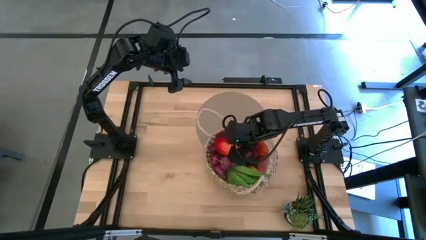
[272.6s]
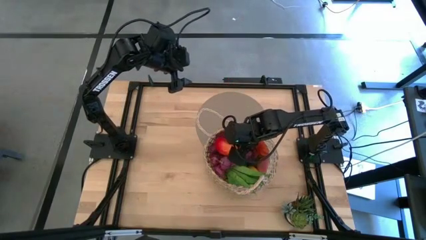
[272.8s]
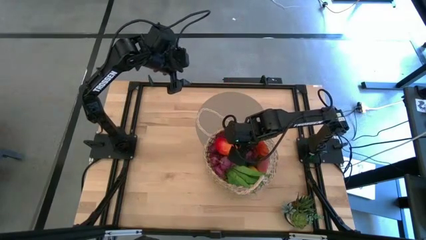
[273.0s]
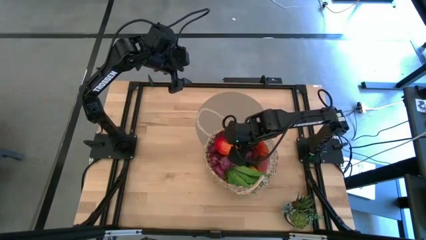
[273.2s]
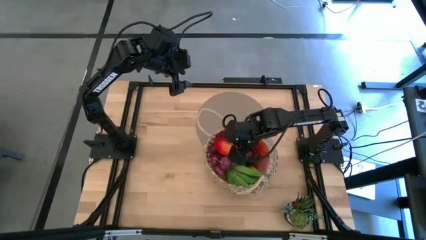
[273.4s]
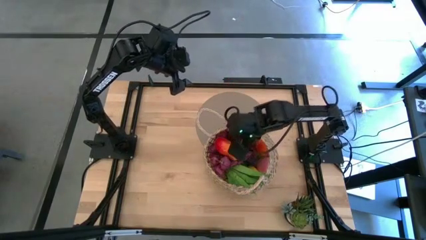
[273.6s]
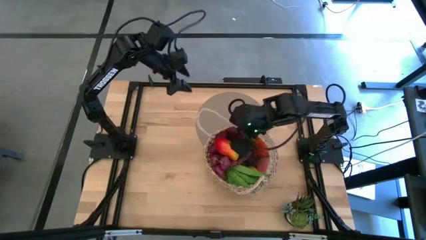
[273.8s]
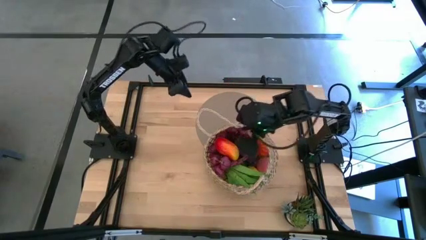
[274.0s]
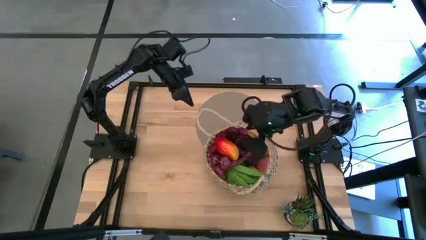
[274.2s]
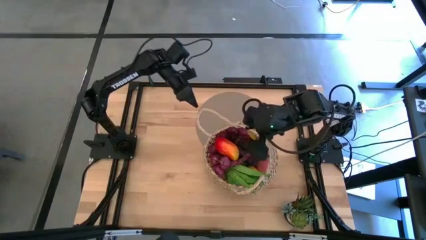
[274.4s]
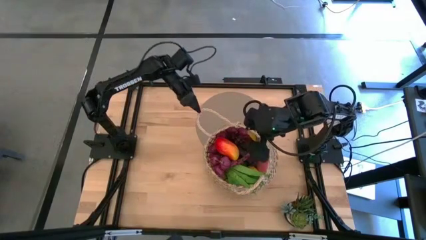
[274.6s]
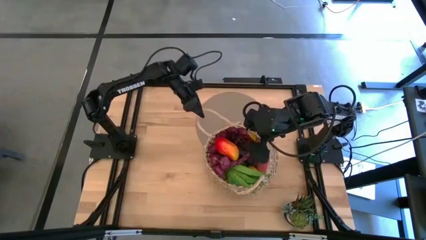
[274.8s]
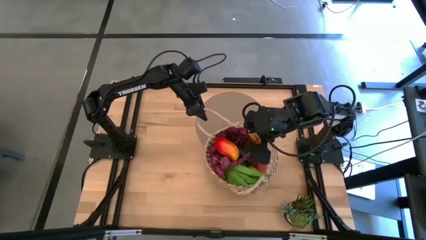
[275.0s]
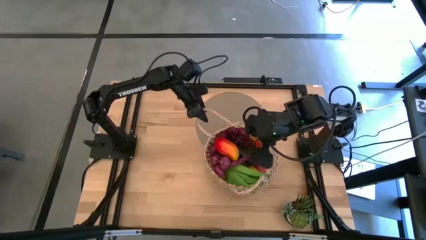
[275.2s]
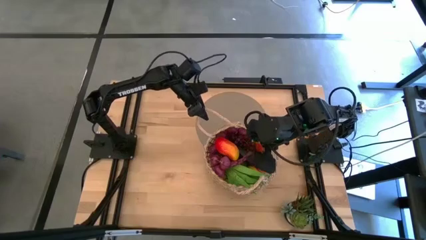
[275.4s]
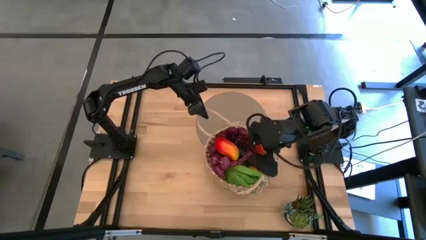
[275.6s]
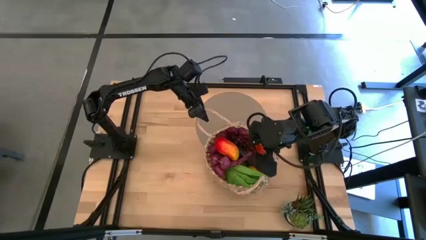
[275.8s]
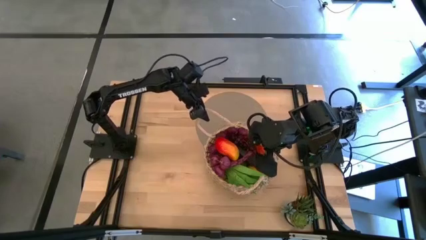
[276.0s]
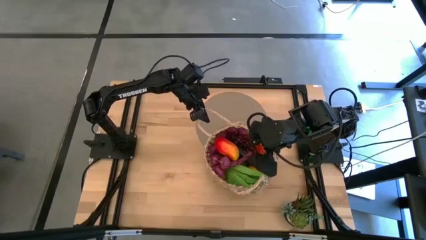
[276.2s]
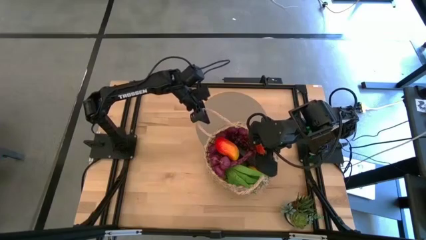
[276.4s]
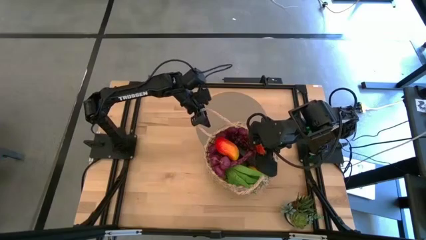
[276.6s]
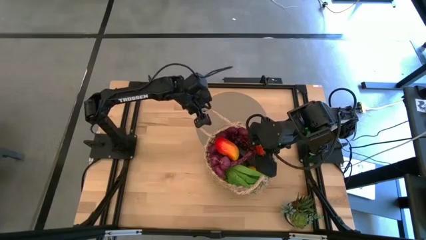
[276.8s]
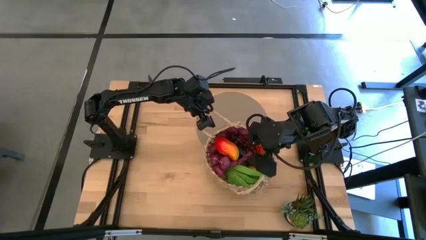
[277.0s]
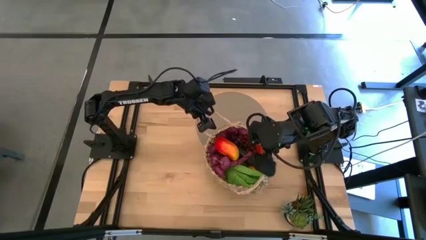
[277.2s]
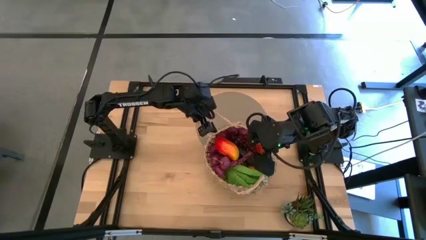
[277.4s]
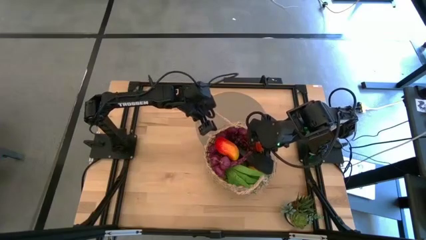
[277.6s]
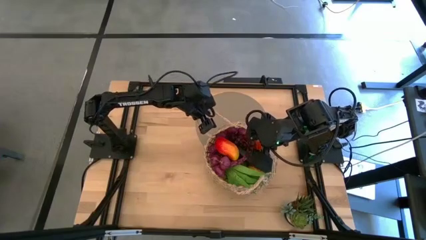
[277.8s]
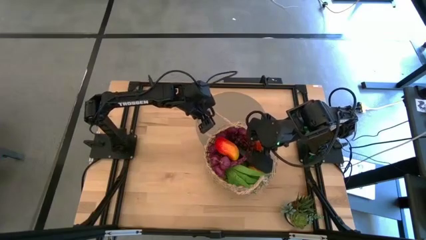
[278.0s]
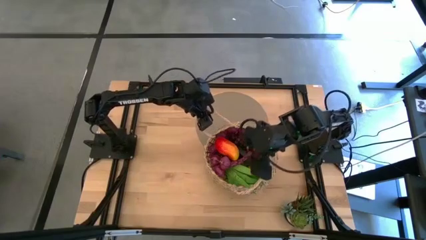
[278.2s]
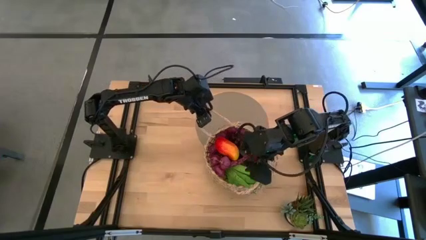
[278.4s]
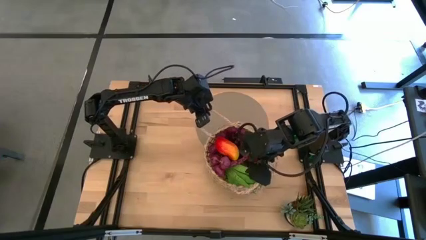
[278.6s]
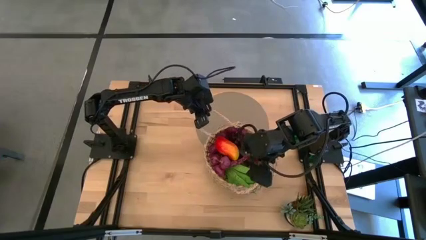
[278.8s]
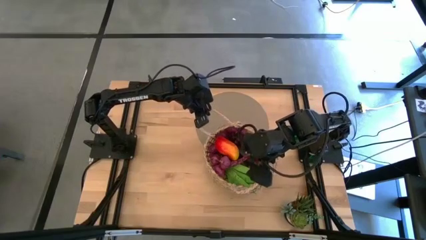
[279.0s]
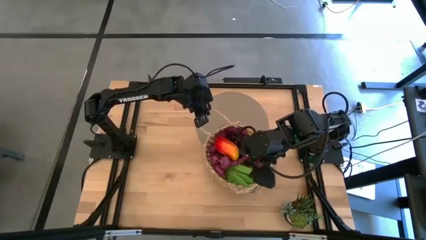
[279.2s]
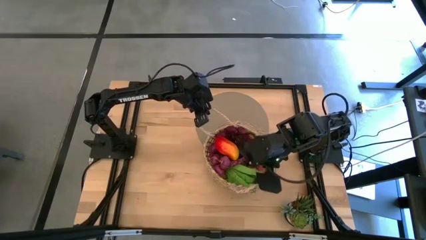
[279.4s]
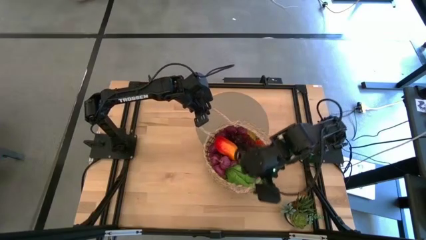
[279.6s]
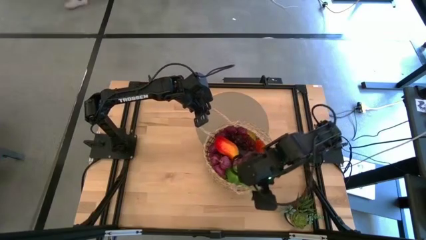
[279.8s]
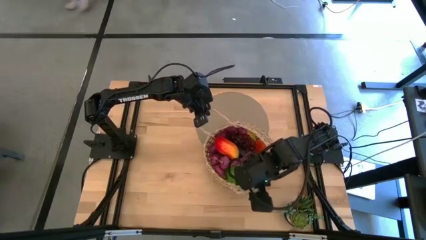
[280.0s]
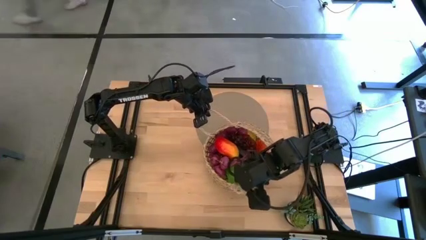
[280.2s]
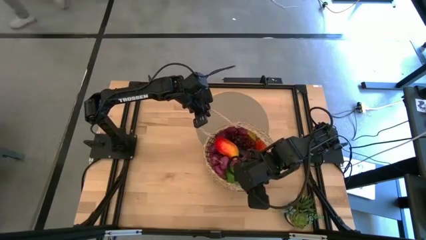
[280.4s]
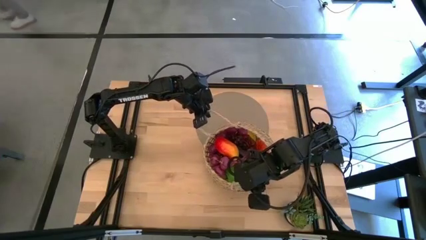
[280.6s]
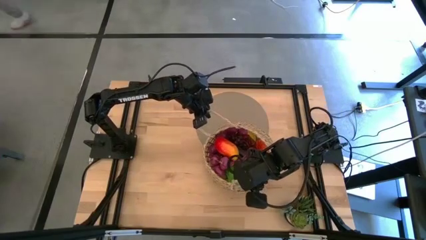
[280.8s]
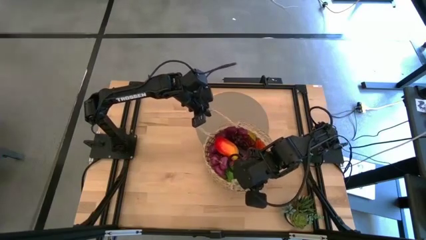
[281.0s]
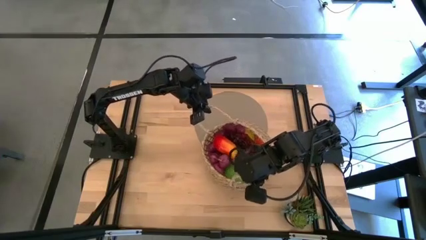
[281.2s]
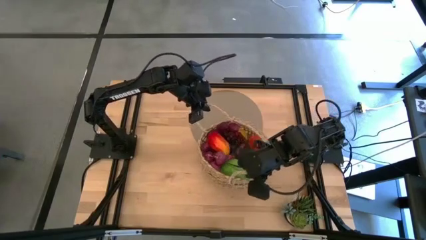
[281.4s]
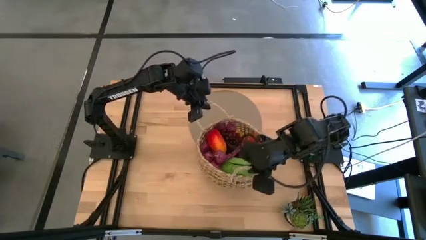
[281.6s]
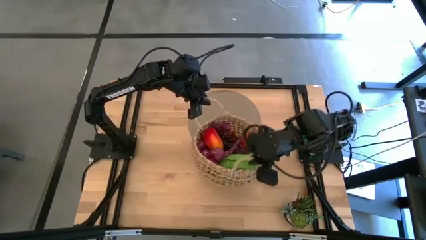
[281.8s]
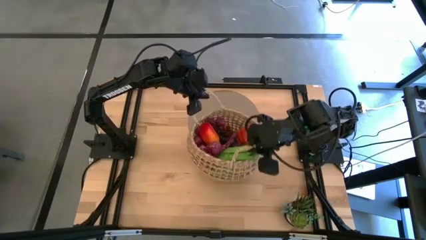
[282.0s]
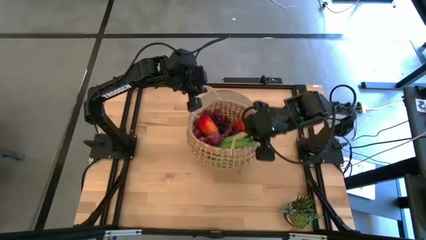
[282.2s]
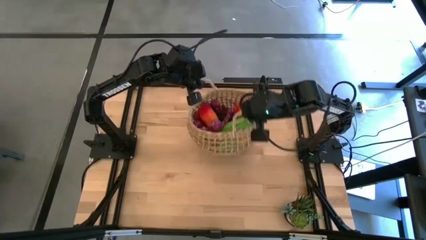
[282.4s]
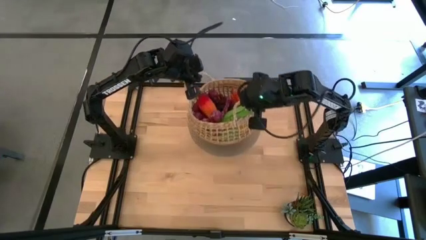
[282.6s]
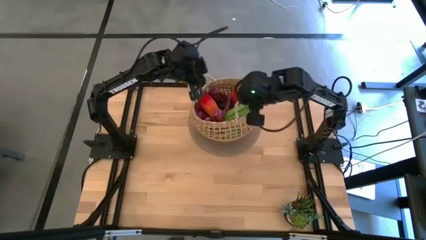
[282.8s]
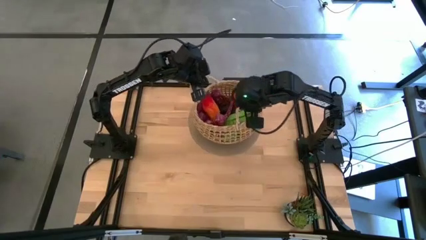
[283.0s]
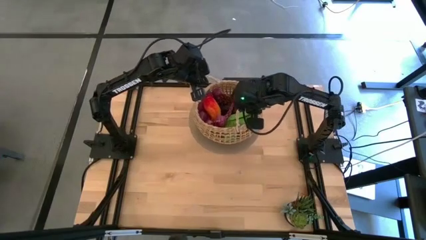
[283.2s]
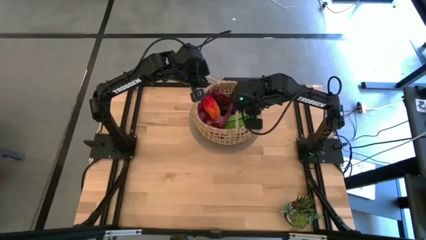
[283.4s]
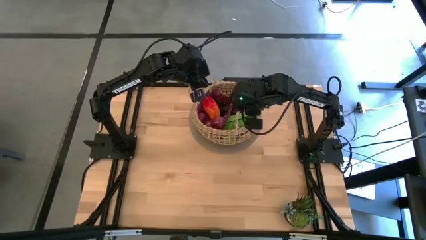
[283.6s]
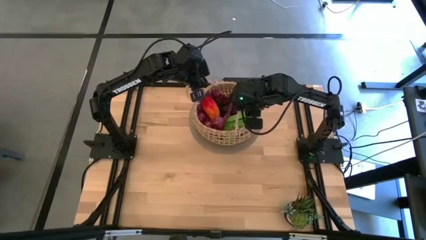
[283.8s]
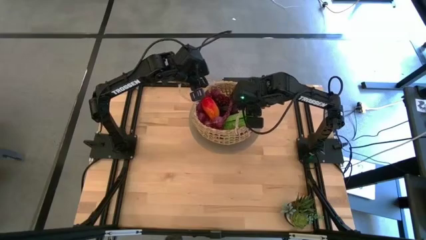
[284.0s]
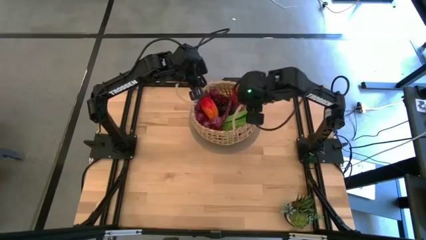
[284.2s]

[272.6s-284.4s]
Task: Build produce basket
Put the brown basket on the gray mat

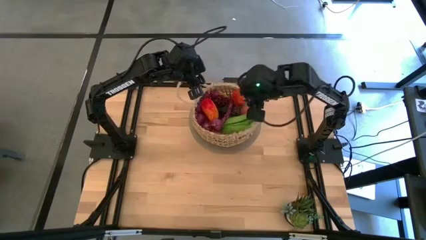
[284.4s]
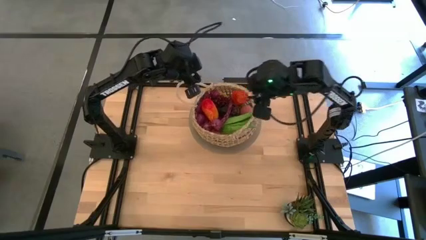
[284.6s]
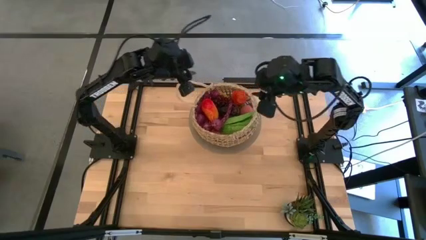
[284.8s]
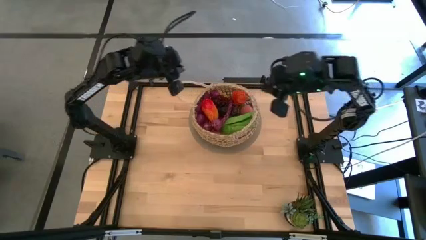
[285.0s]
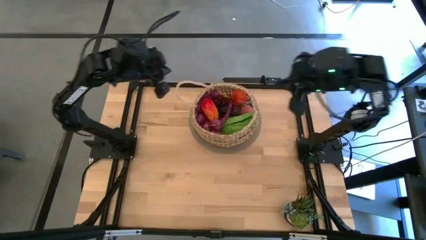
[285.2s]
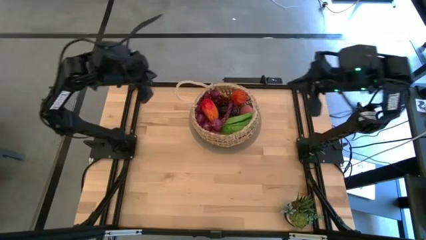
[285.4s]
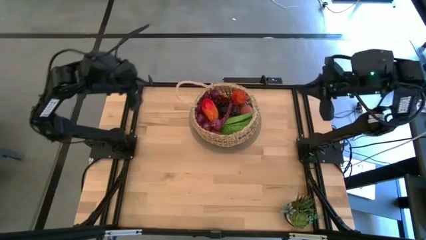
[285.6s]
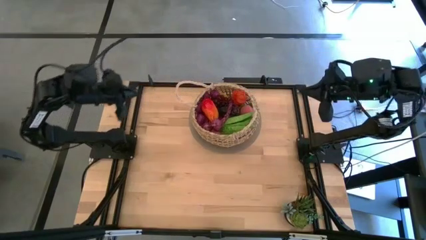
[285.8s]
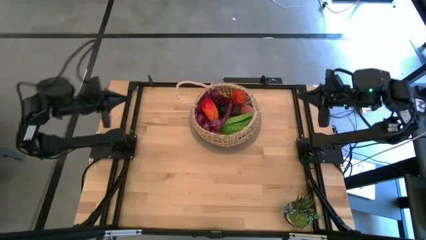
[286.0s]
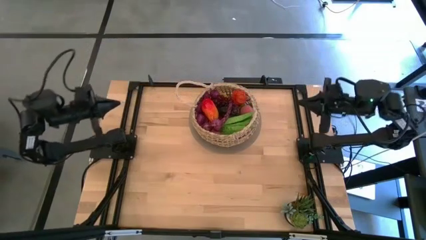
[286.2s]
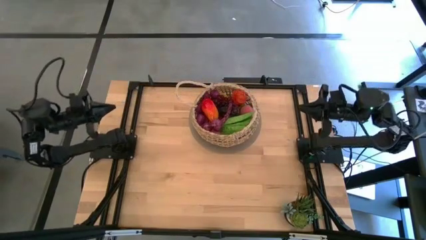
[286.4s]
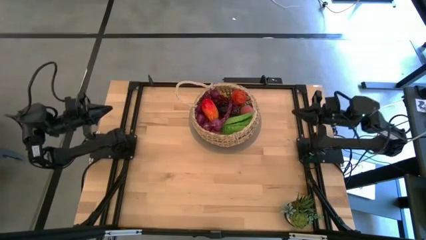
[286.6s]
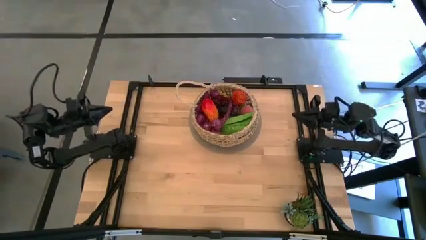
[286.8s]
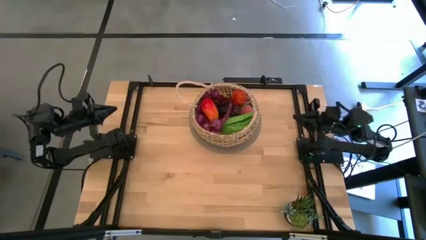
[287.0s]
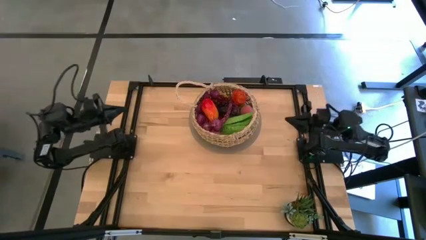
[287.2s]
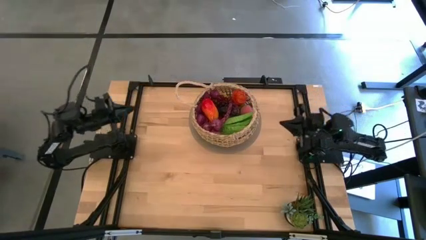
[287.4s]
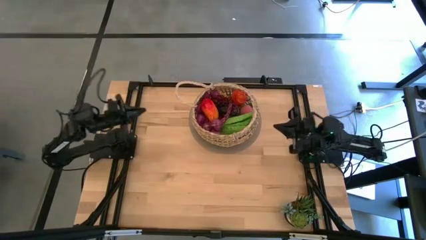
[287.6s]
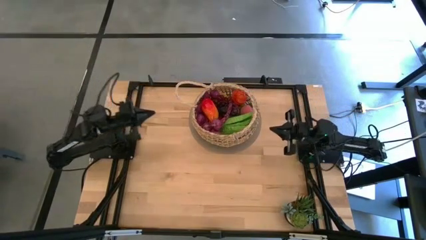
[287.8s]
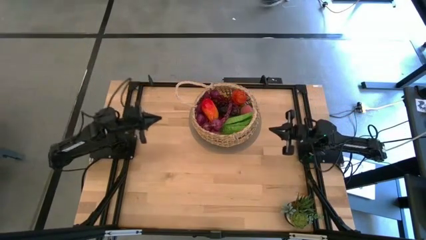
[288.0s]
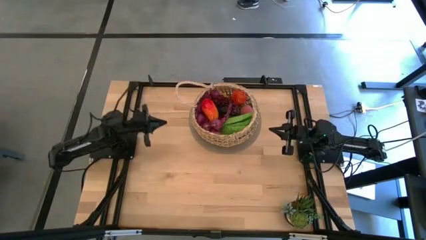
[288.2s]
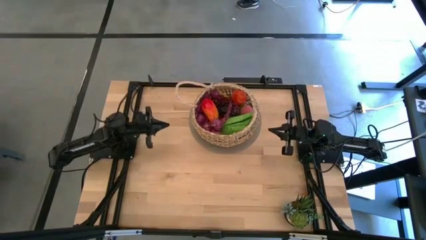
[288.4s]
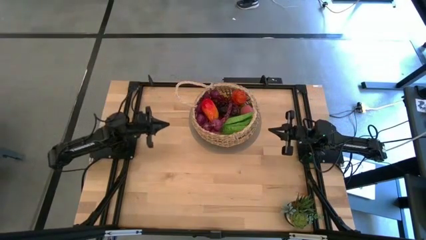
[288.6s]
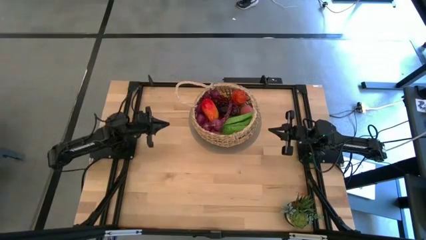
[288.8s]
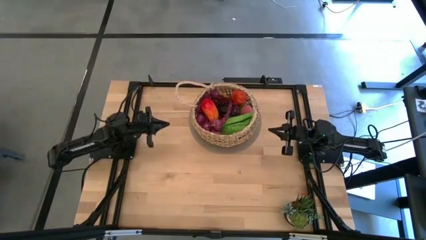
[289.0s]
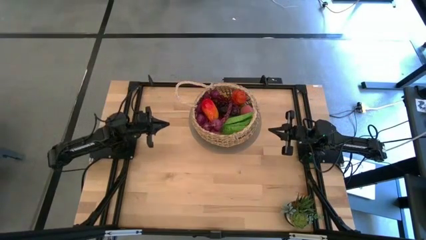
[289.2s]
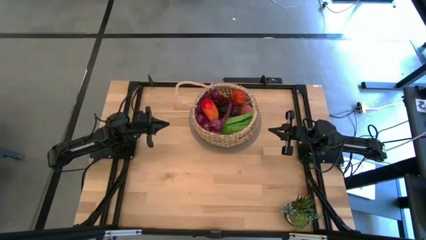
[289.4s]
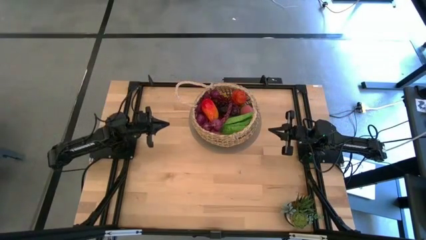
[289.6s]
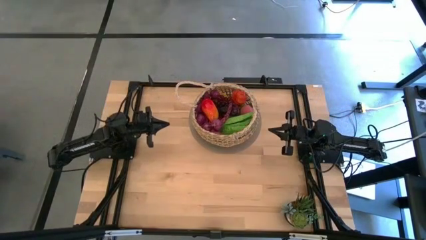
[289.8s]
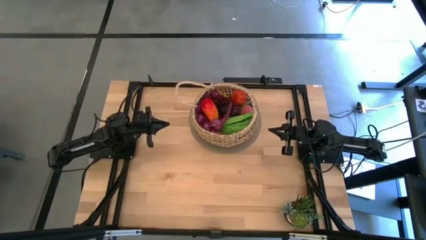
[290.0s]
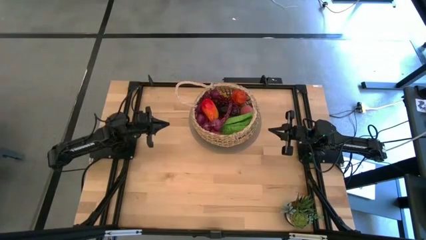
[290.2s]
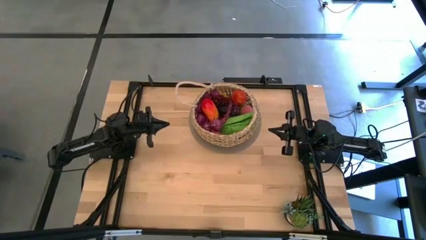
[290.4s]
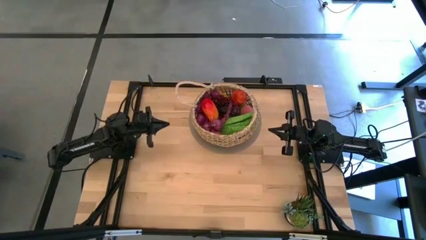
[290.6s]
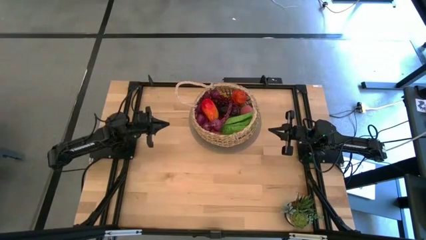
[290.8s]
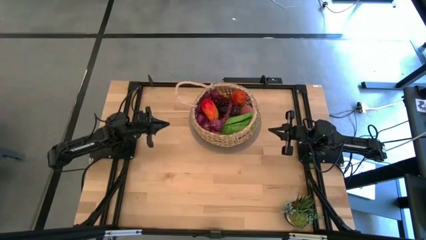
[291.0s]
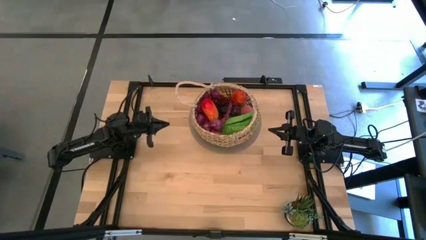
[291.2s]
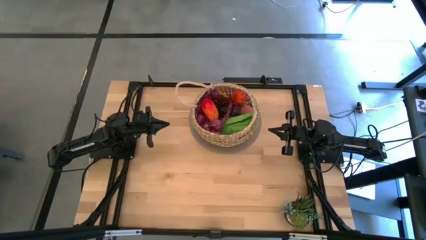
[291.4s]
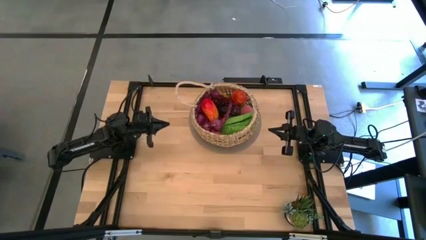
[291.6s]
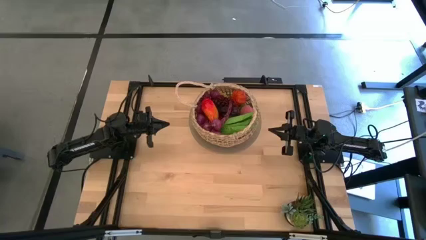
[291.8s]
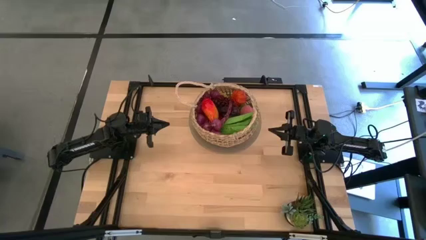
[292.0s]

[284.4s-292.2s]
Return to Home Position
